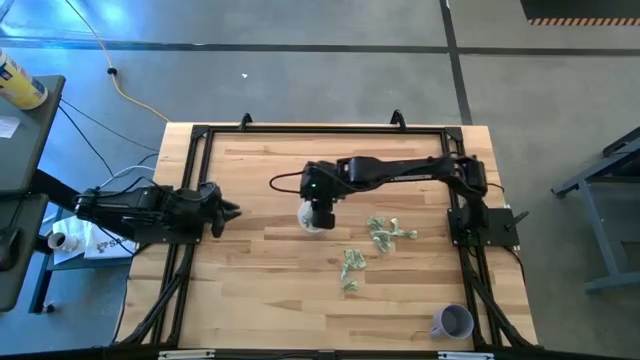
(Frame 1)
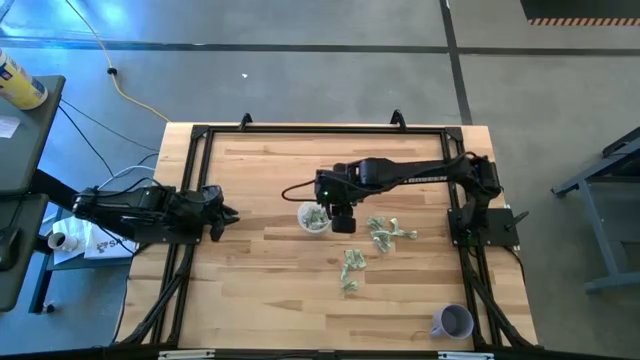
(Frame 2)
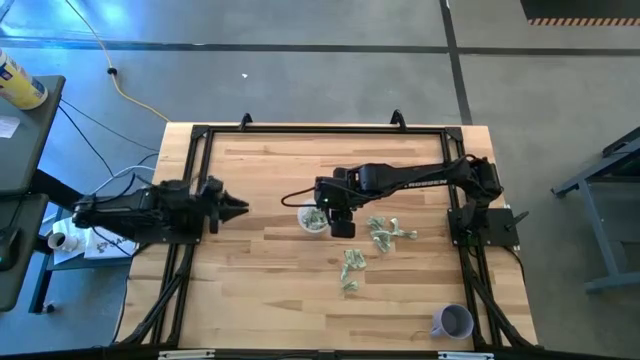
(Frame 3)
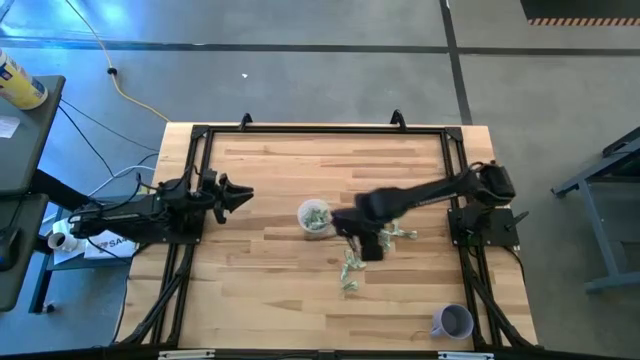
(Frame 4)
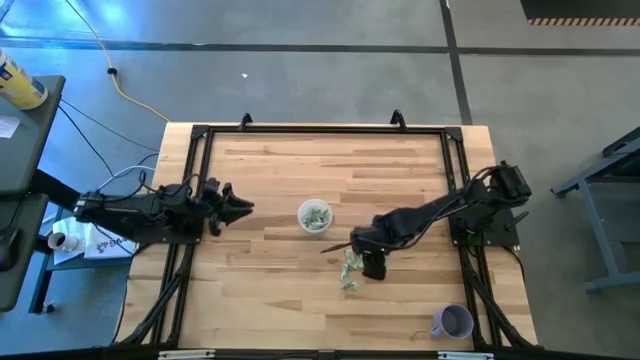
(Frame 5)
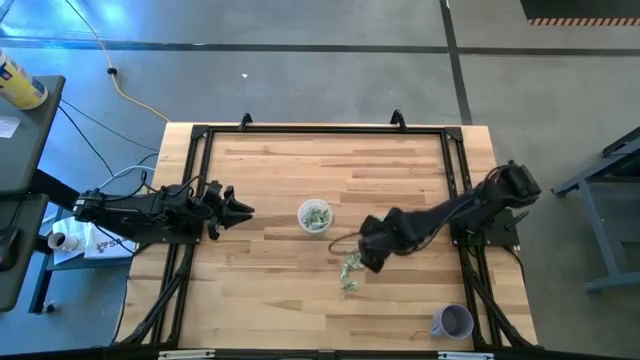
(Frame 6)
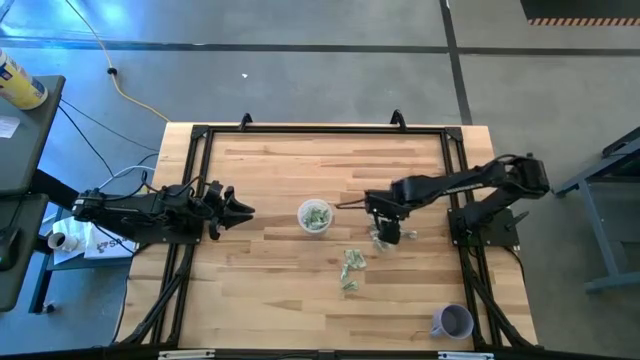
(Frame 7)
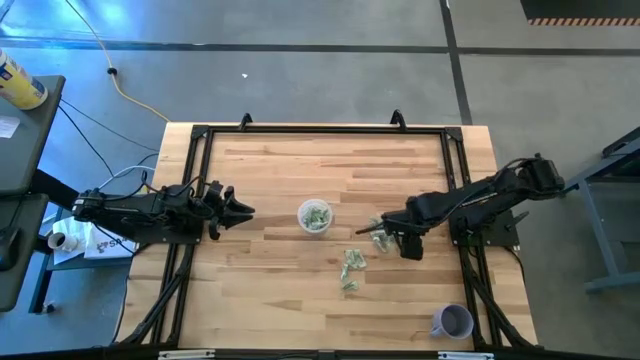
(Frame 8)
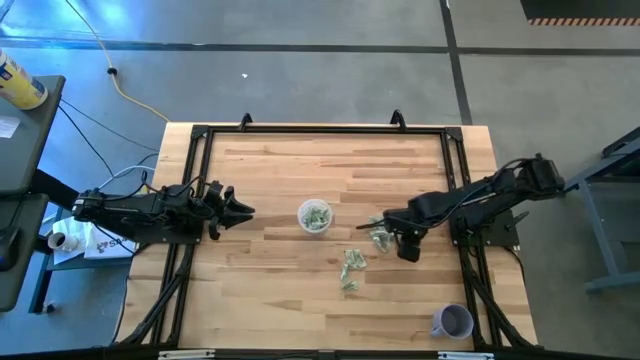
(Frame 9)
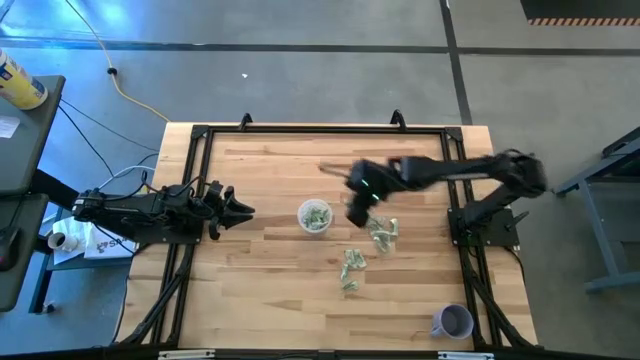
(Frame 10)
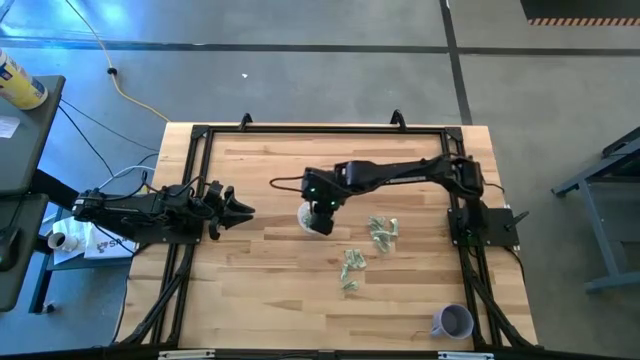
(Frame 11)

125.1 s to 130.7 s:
Task: Pick and place Stevia / Truvia into bins
Put the white stevia packet into the transparent container

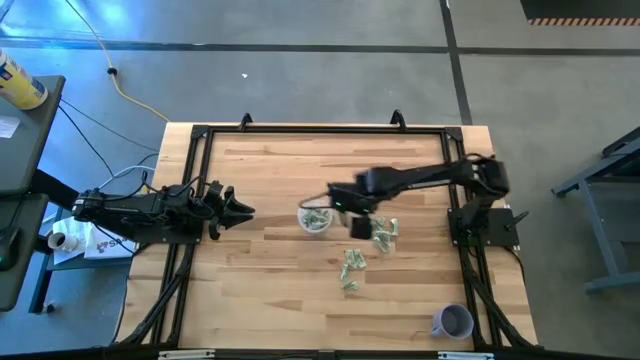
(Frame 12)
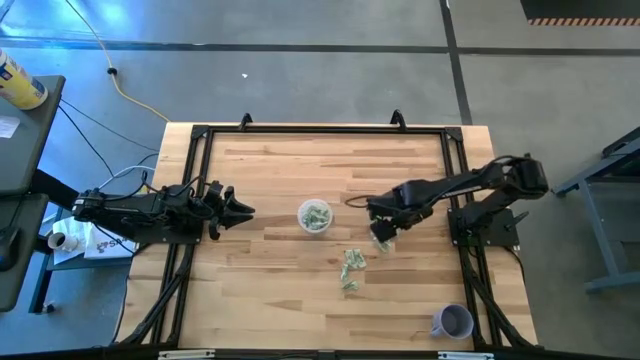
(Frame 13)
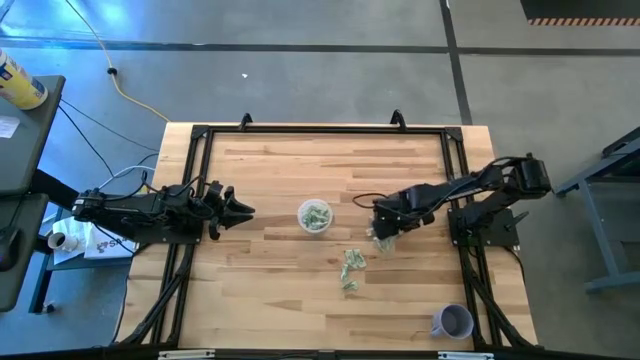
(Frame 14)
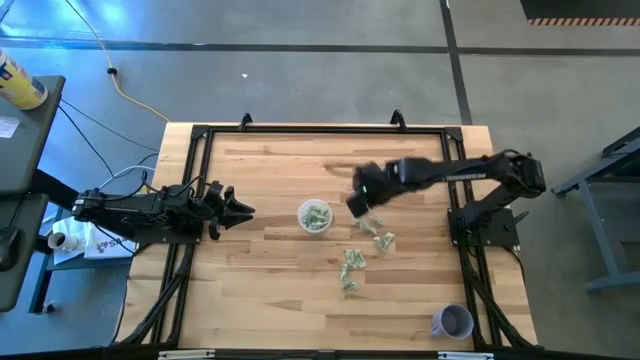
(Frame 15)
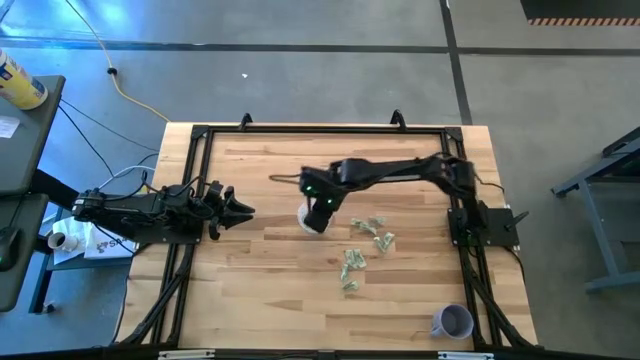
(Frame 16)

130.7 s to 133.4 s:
Put the white stevia packet into the transparent container

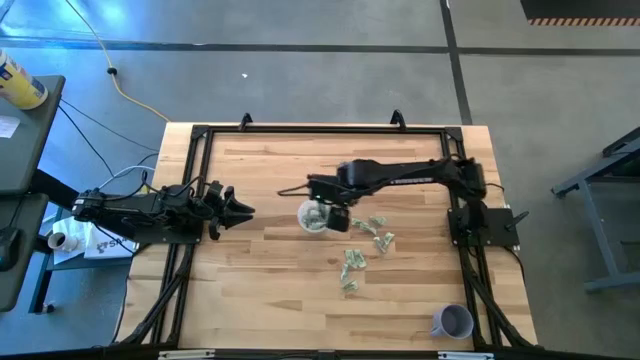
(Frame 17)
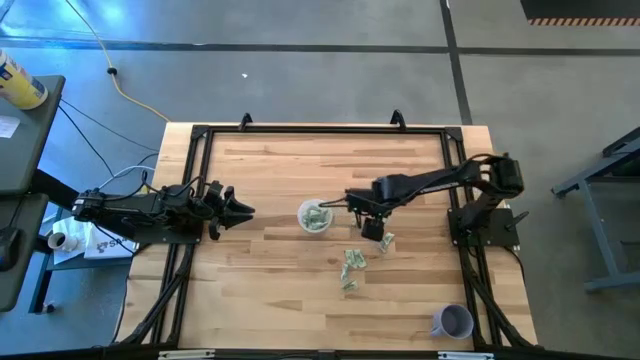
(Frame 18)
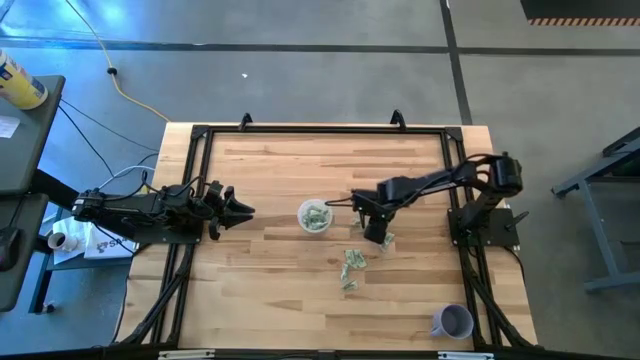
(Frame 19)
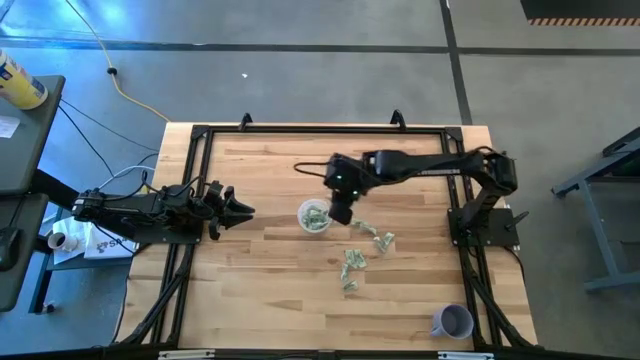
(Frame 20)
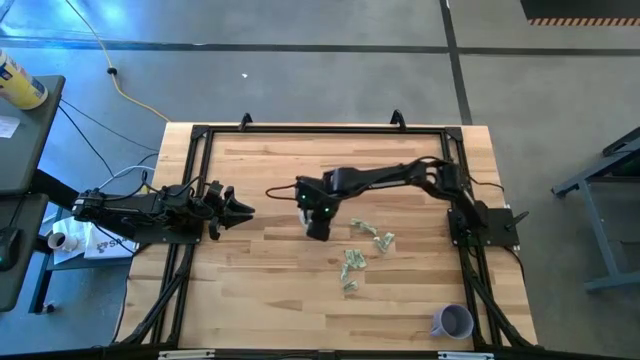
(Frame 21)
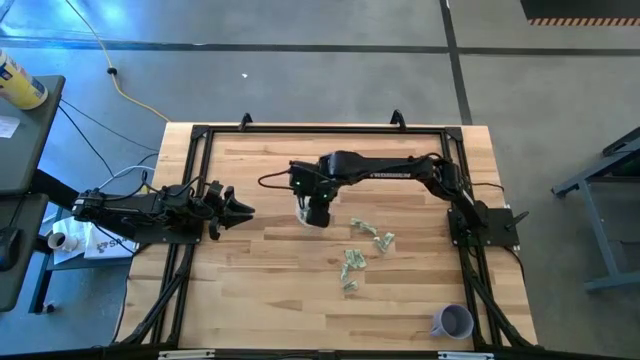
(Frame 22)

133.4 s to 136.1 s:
Put the white stevia packet into the transparent container

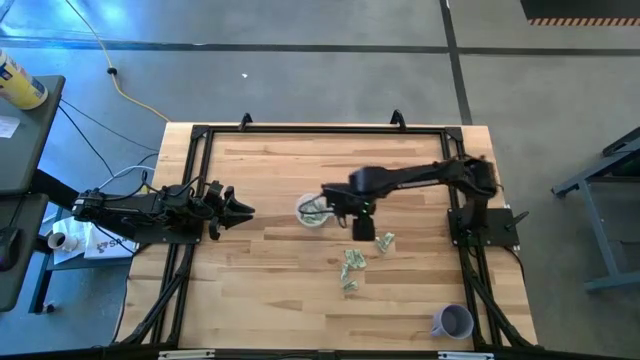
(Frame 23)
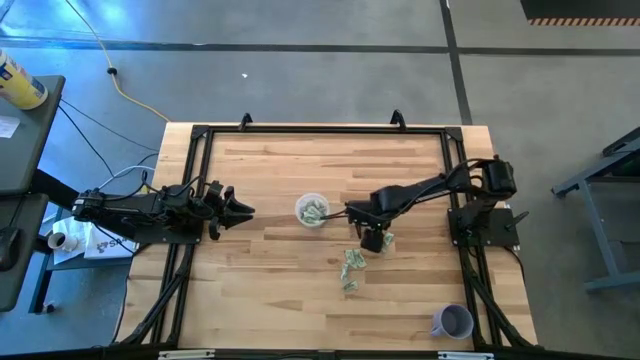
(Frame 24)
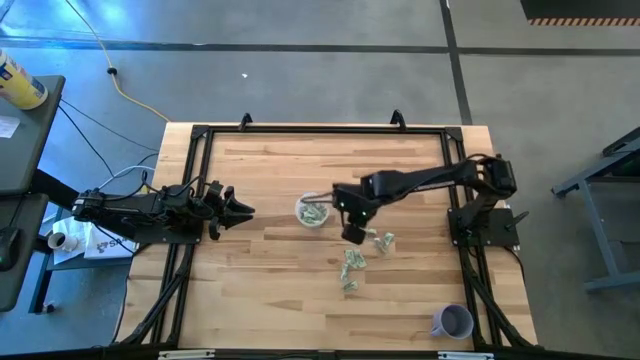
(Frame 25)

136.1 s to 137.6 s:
Put the white stevia packet into the transparent container

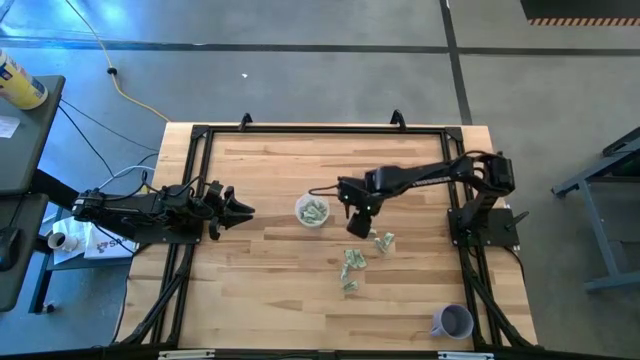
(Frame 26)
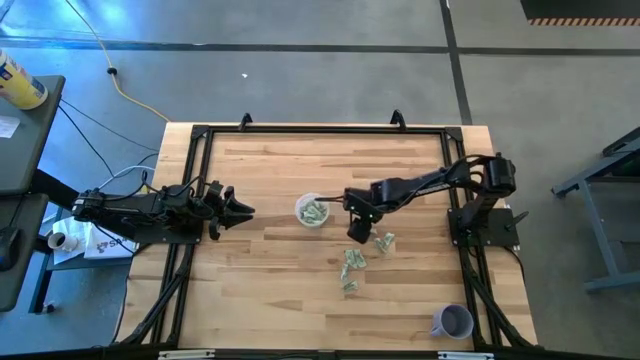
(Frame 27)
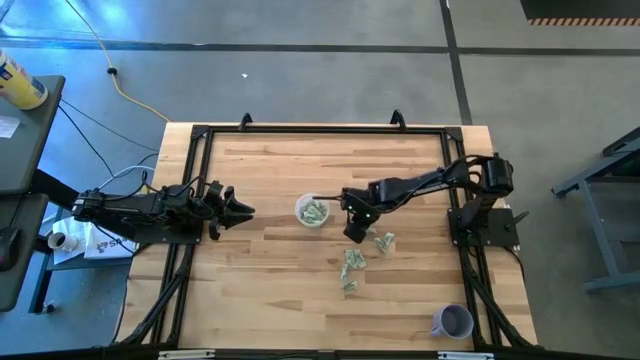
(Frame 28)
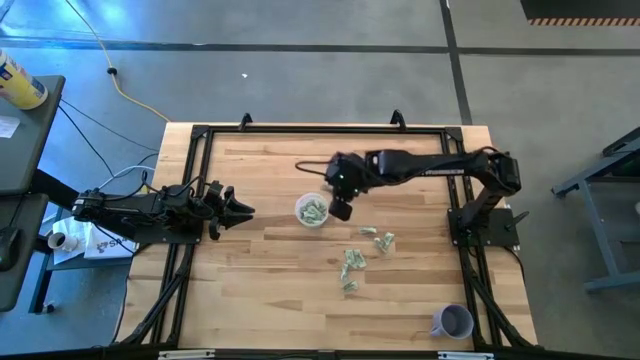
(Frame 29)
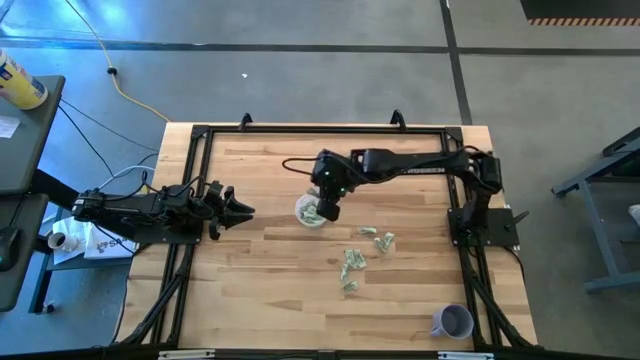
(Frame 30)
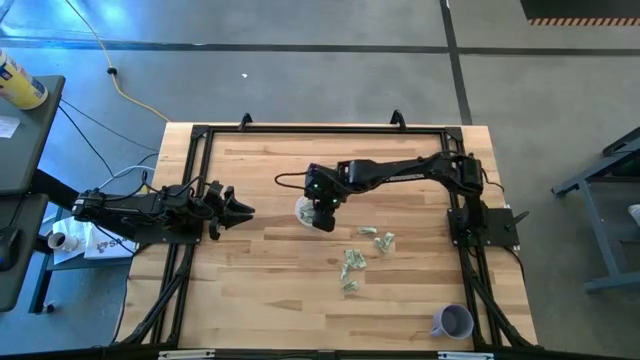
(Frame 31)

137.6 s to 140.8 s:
Put the white stevia packet into the transparent container

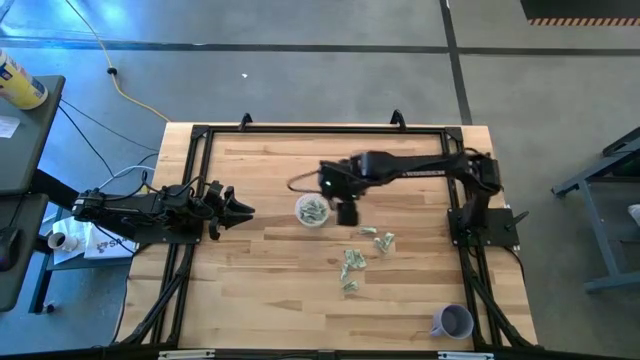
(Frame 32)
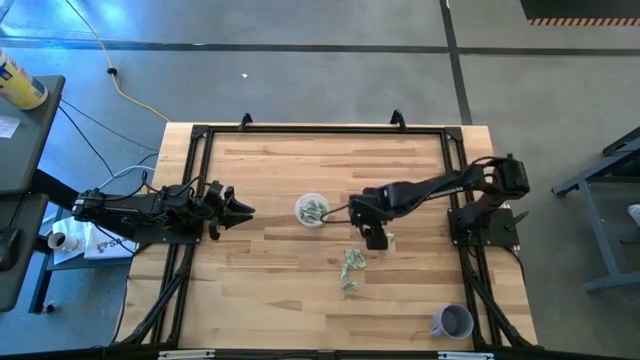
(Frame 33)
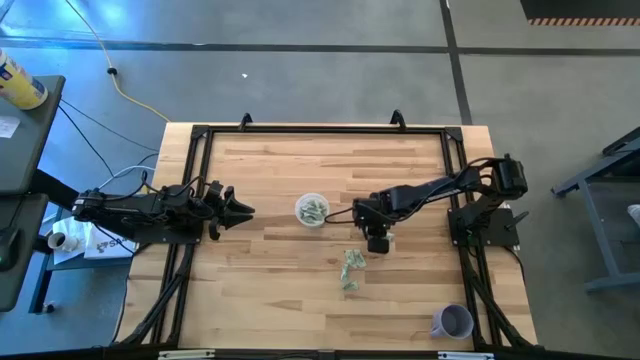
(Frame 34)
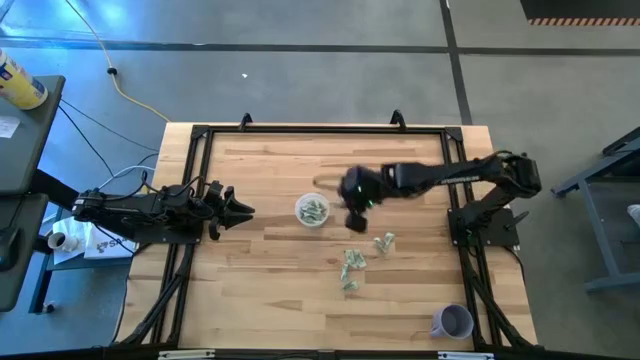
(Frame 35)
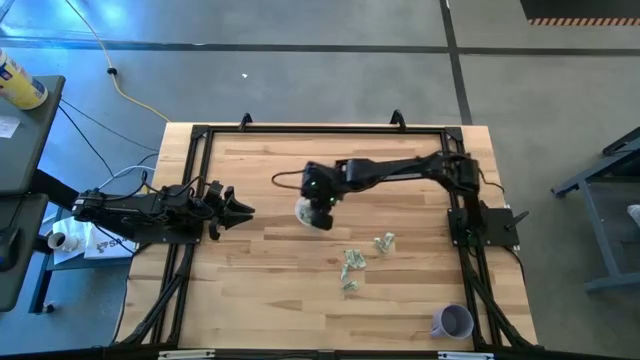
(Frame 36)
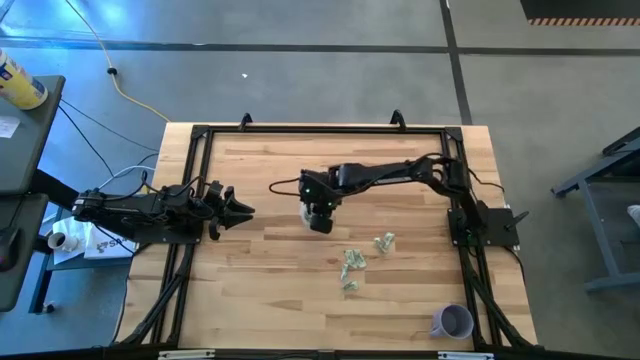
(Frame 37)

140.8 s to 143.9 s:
Put the white stevia packet into the transparent container

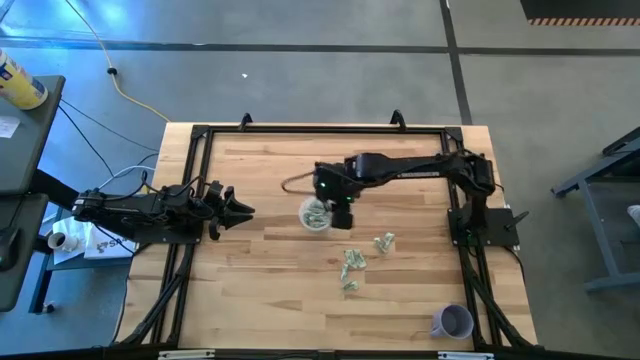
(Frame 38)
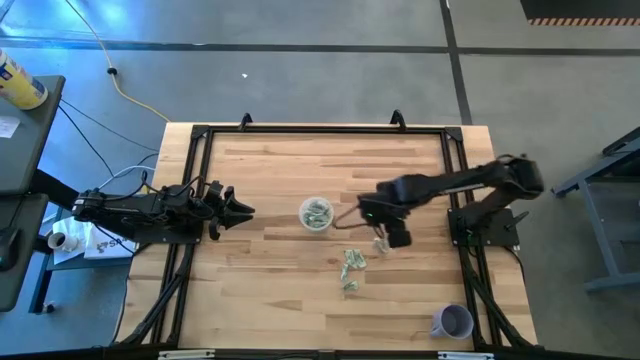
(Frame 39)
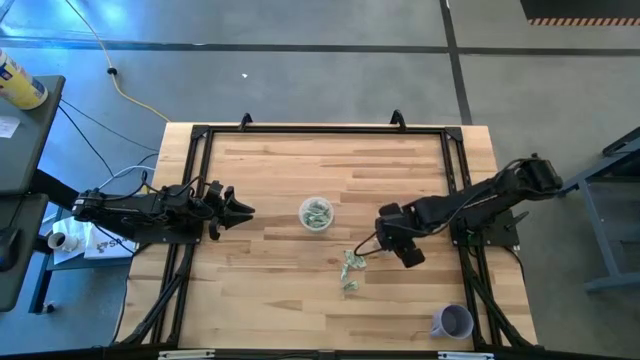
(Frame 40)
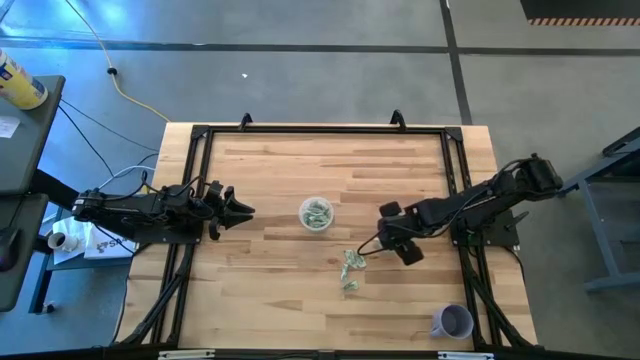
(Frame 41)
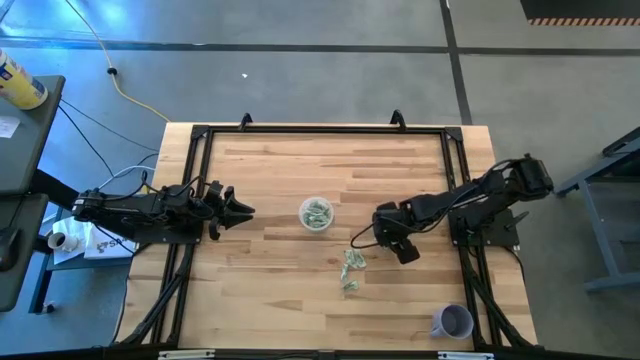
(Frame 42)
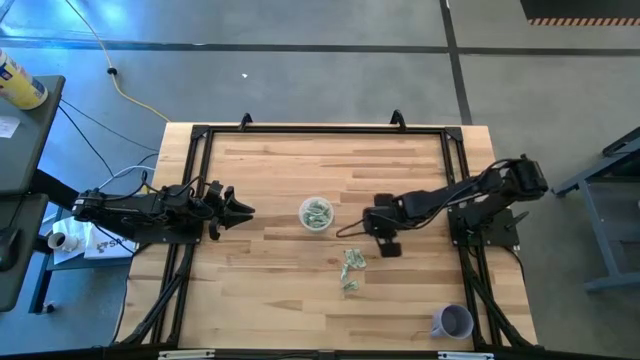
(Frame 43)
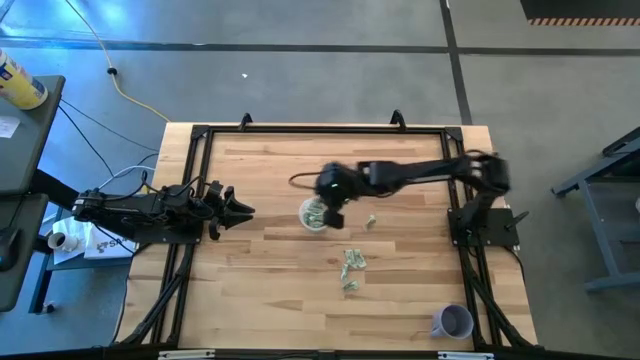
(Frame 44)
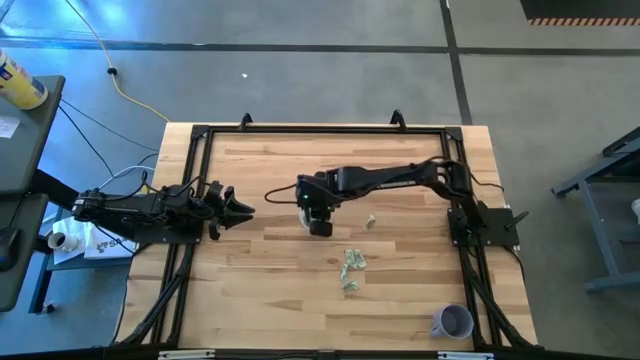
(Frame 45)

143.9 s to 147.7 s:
Put the white stevia packet into the transparent container
